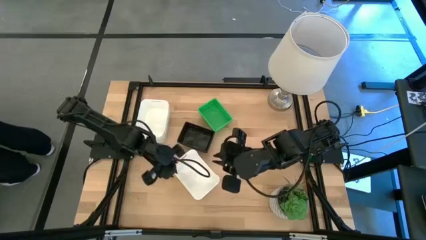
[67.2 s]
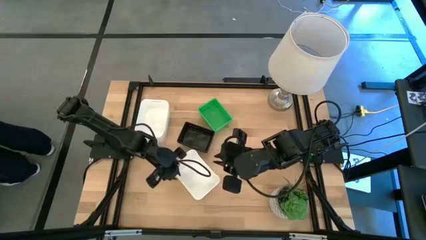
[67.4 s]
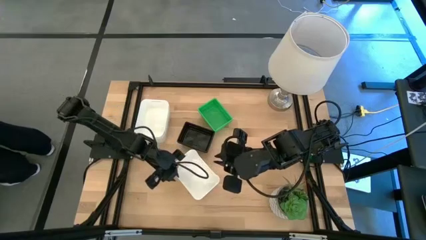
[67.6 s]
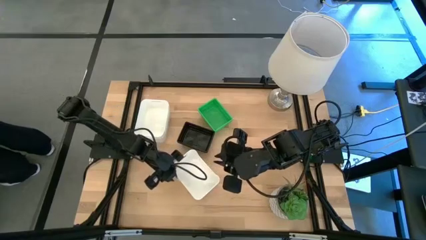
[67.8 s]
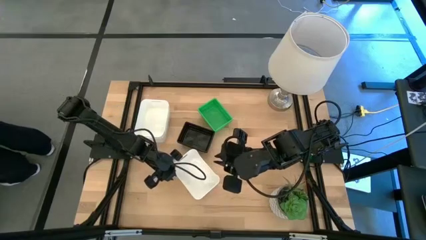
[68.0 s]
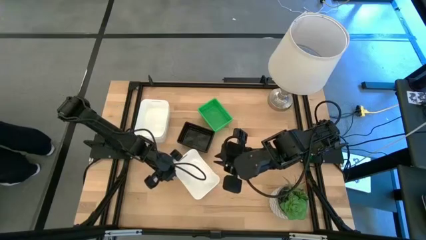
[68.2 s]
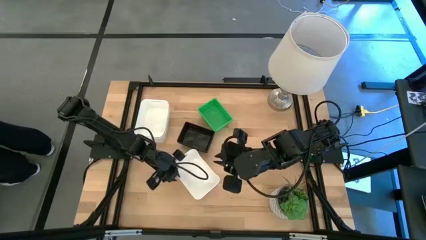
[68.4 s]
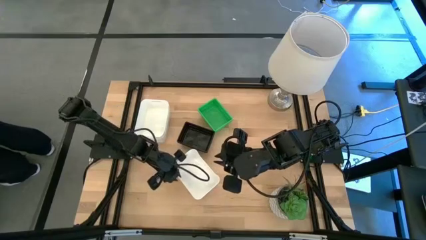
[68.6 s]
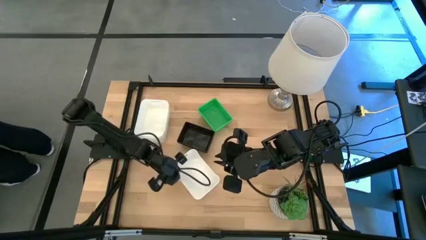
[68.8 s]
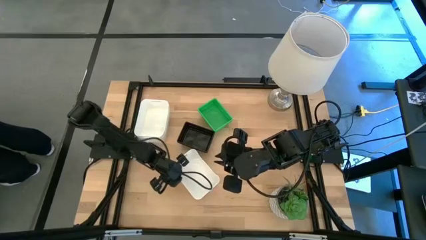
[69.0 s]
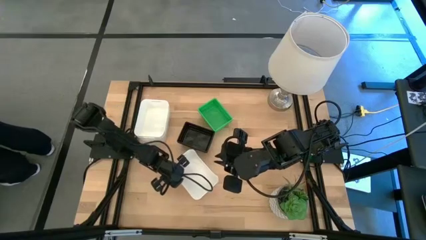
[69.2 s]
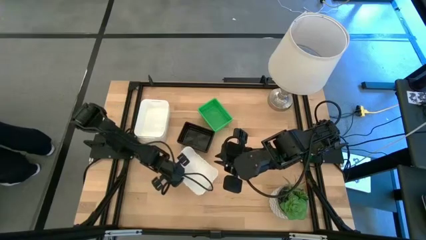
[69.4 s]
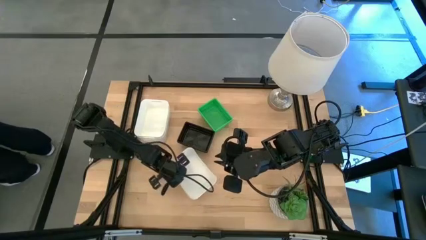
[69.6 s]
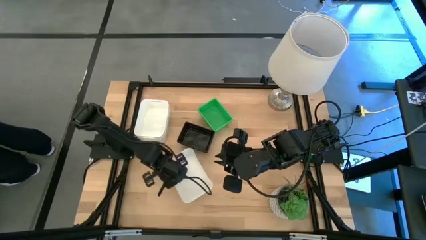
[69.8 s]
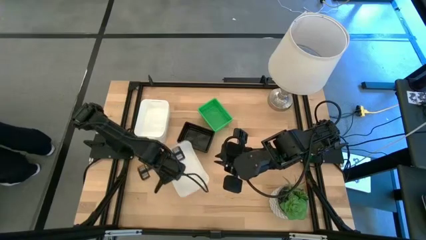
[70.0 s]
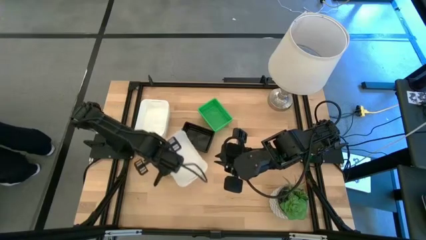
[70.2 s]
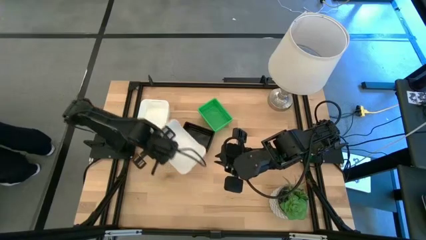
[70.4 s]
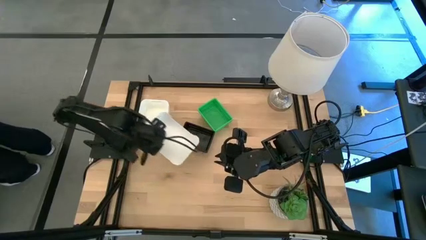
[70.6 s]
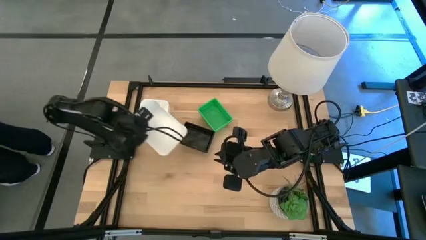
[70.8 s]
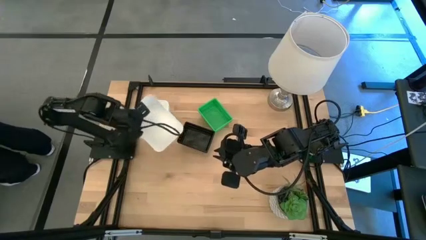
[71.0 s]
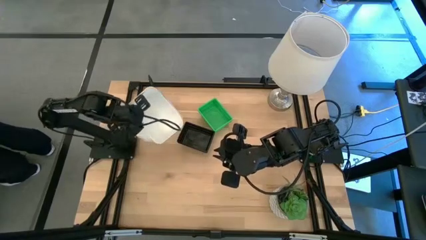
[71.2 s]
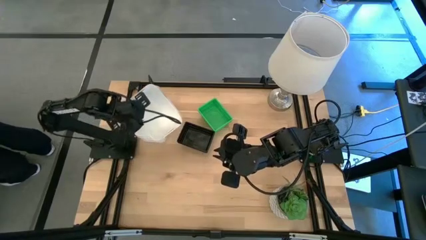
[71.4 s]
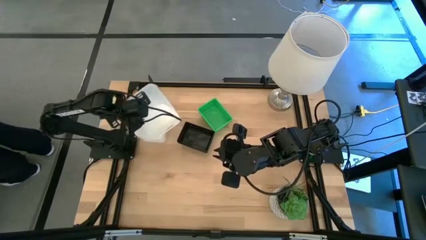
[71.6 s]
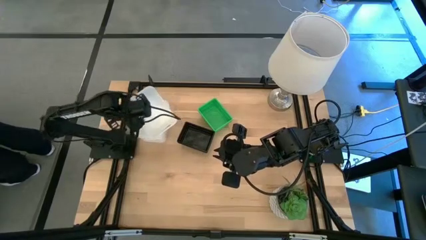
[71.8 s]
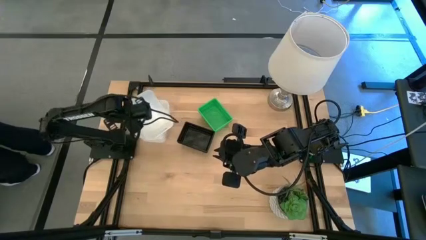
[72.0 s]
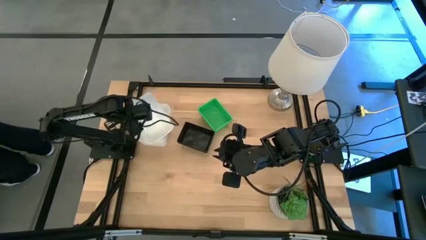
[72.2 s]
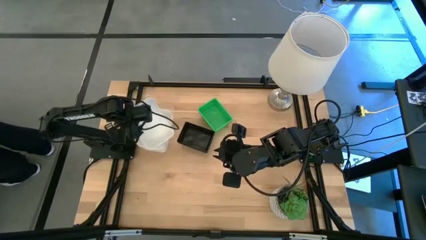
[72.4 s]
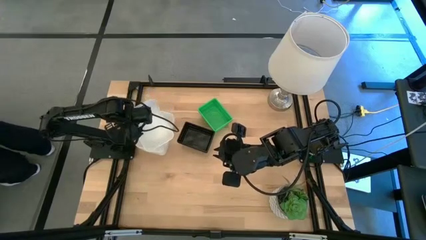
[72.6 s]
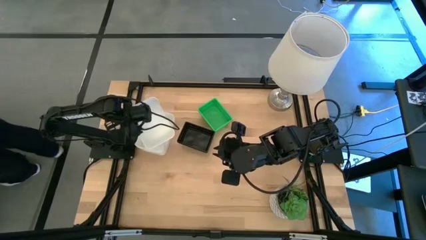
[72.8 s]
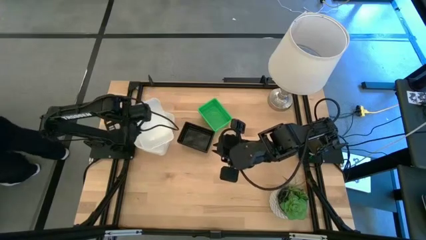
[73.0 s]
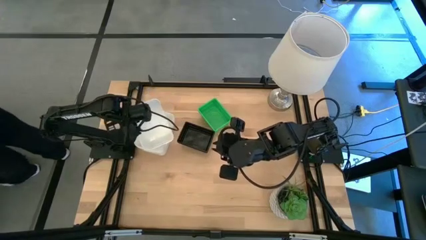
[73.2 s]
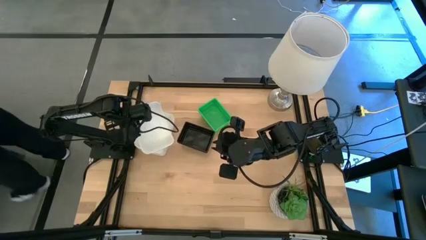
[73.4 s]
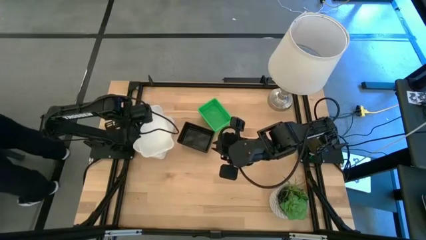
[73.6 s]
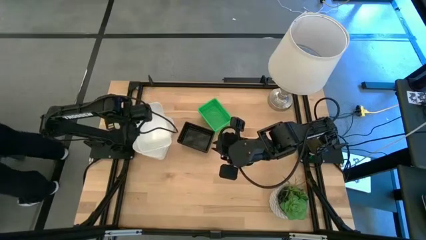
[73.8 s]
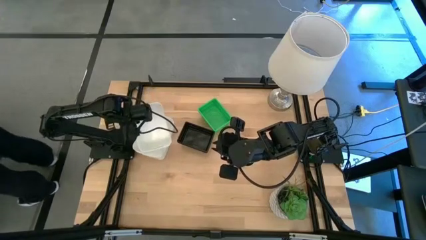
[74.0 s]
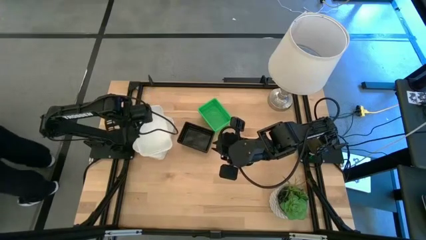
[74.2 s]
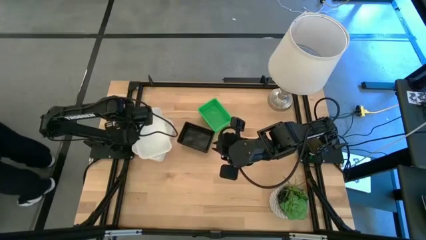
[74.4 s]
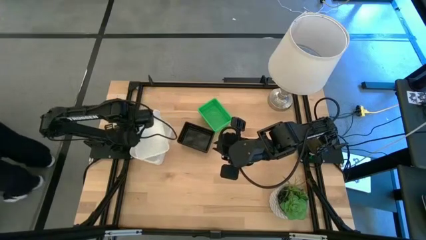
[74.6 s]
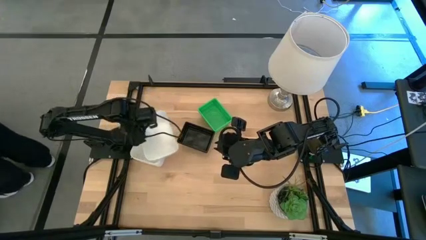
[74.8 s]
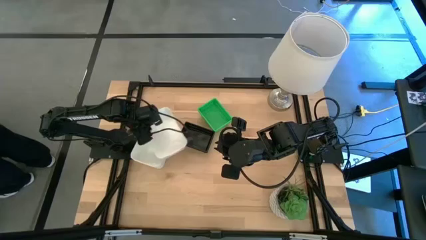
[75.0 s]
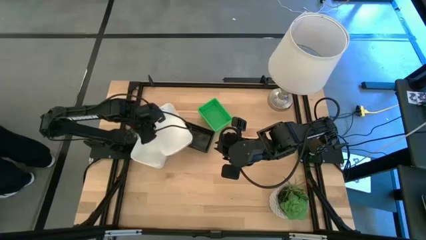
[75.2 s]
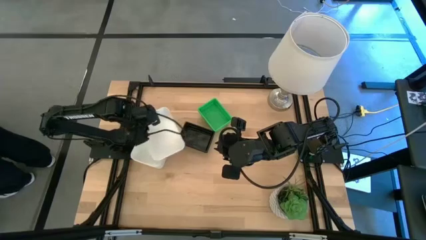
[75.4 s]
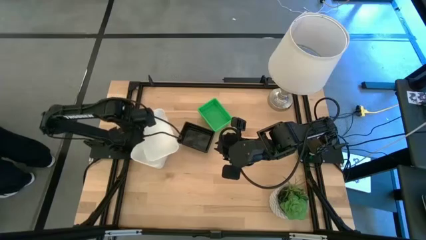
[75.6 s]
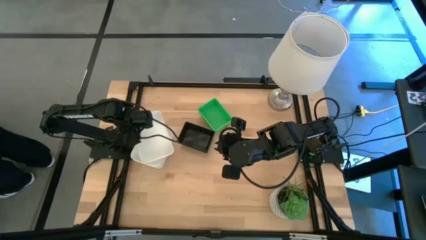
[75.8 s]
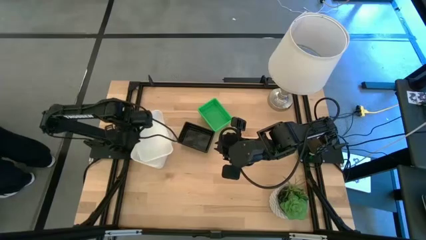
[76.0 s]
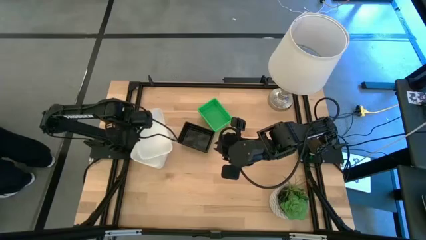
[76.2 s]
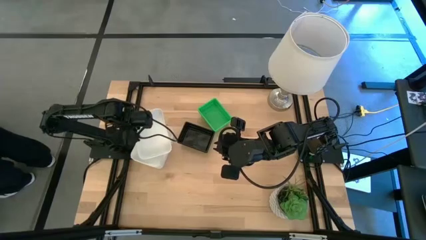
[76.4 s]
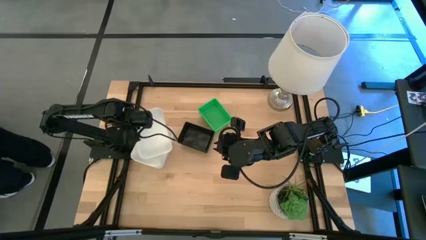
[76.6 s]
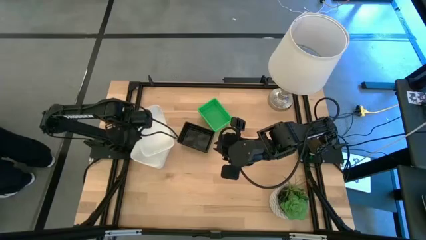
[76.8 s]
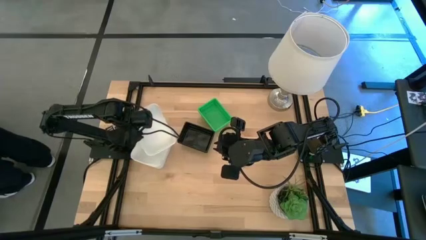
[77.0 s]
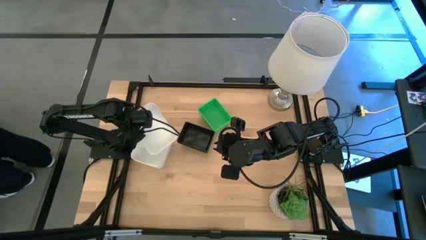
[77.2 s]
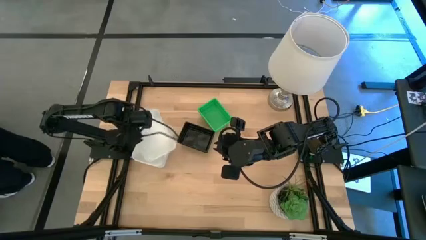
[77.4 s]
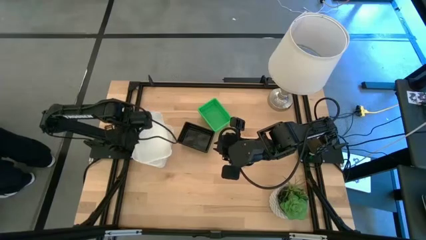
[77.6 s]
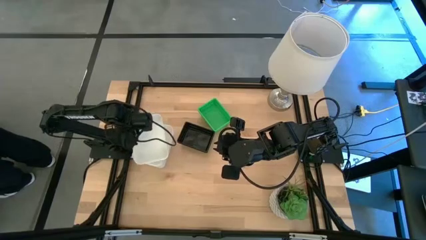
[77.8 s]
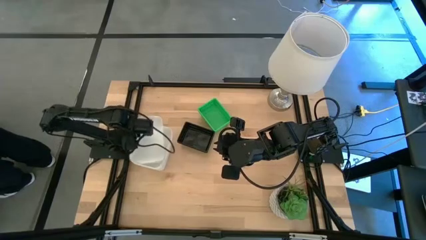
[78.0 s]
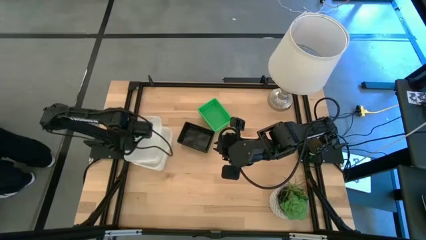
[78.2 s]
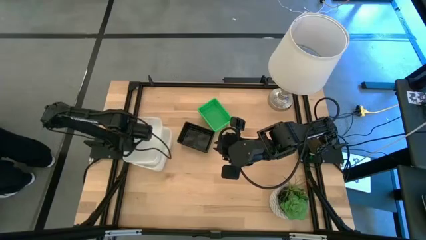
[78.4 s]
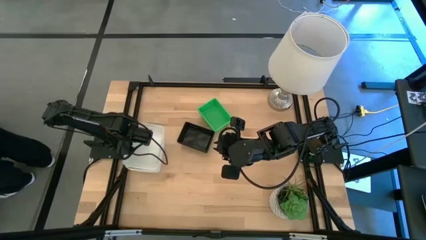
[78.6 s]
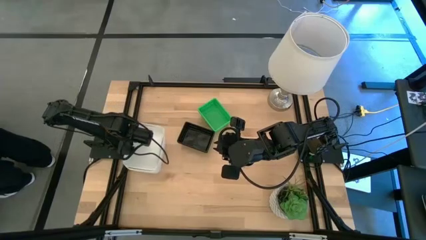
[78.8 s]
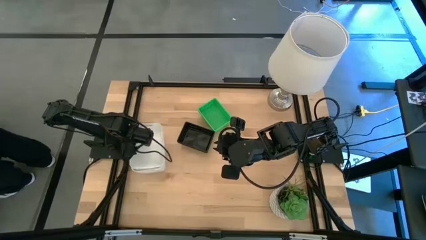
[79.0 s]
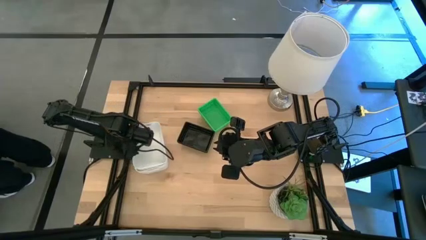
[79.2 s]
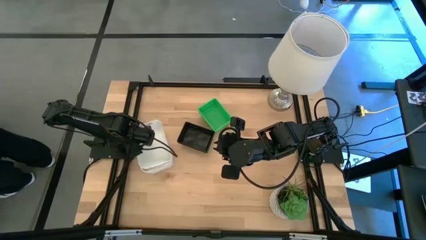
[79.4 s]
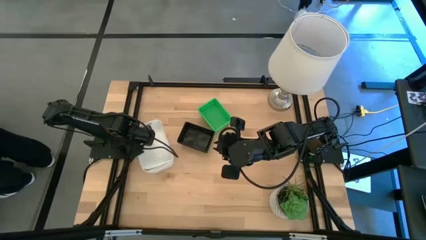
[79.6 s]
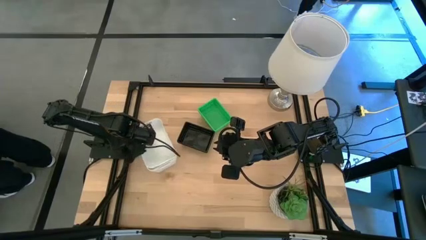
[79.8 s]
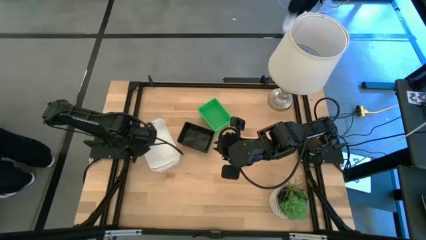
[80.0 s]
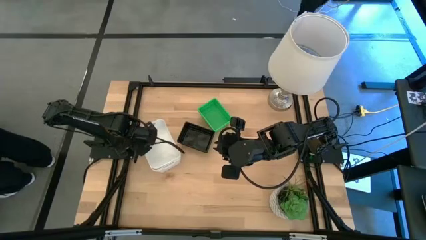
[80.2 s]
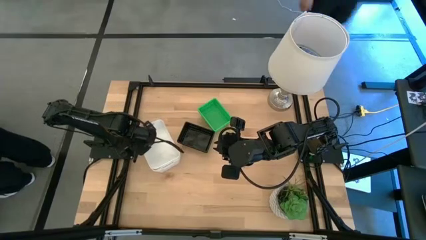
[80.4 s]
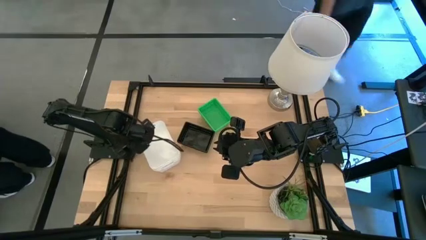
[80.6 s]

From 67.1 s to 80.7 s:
Stack the right white bin on the left white bins
